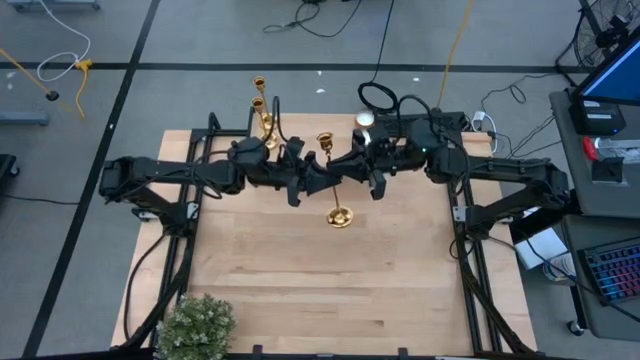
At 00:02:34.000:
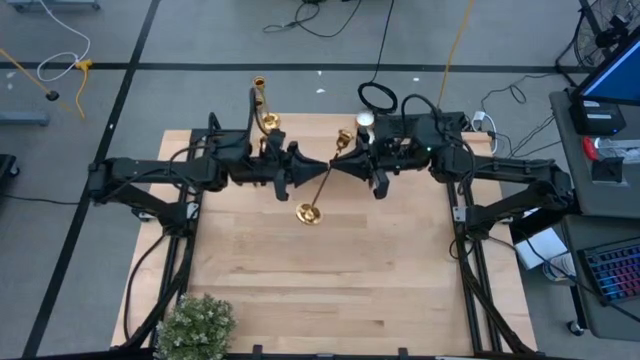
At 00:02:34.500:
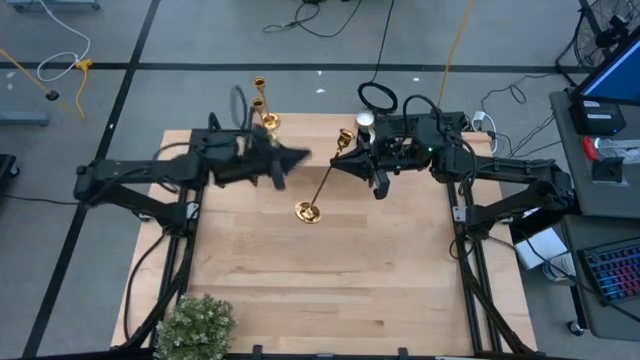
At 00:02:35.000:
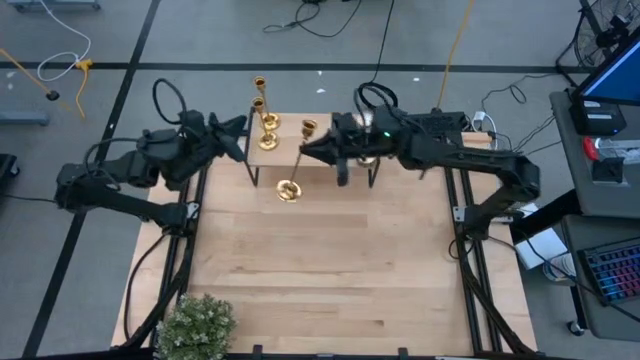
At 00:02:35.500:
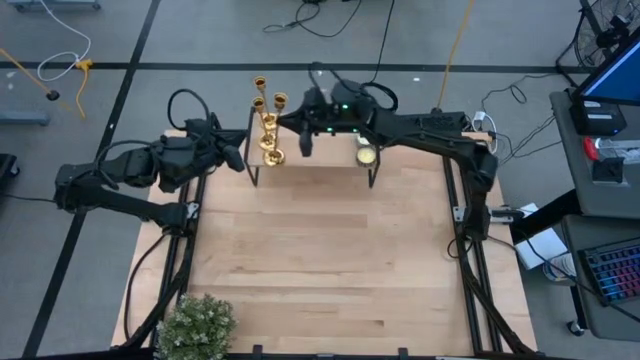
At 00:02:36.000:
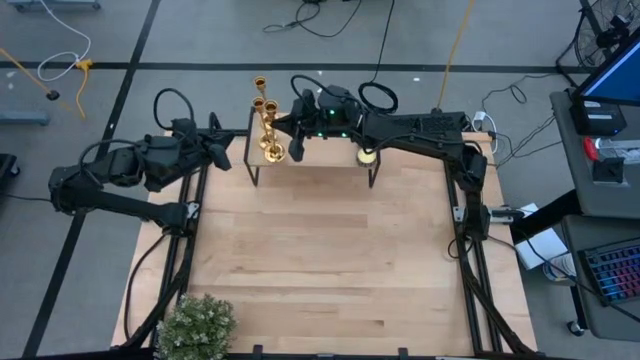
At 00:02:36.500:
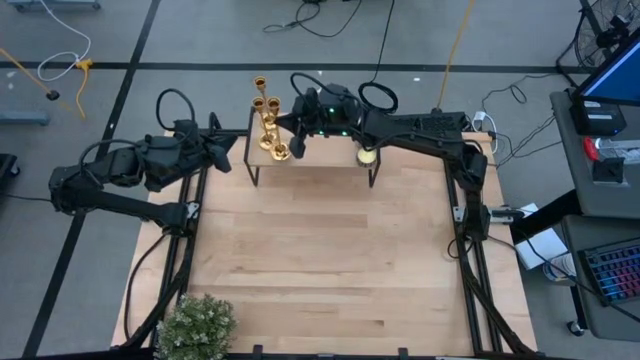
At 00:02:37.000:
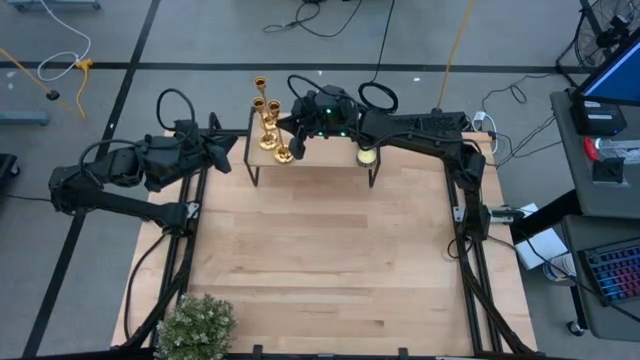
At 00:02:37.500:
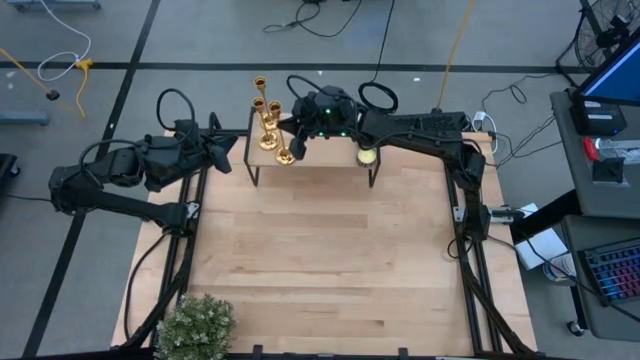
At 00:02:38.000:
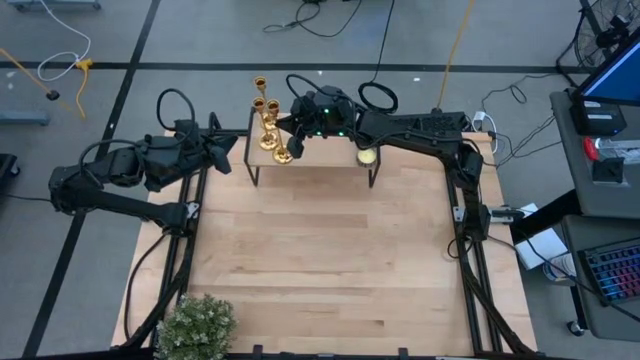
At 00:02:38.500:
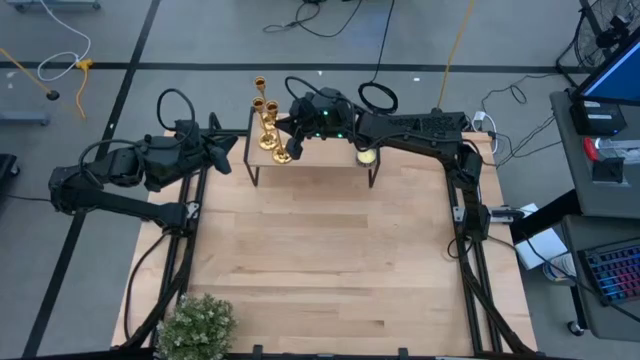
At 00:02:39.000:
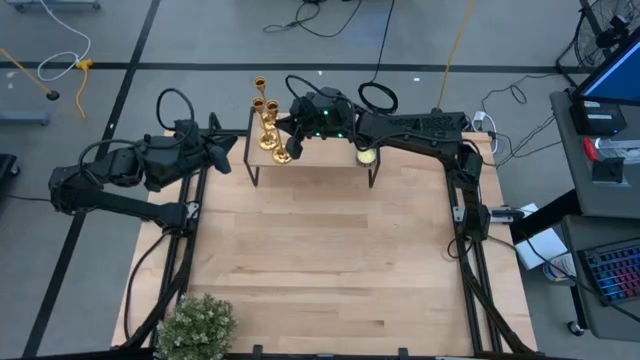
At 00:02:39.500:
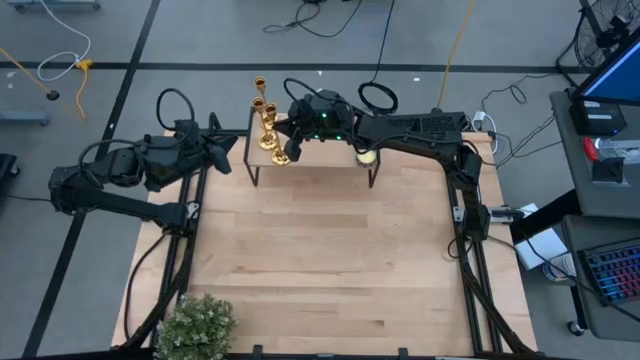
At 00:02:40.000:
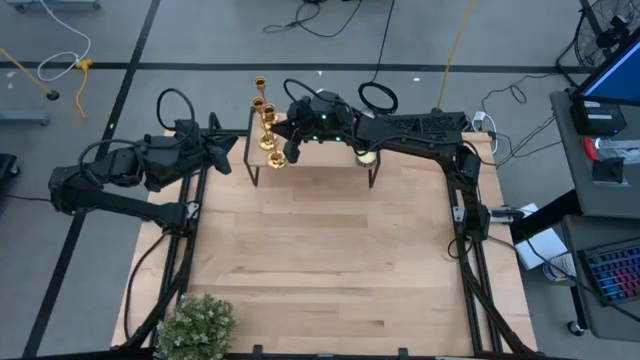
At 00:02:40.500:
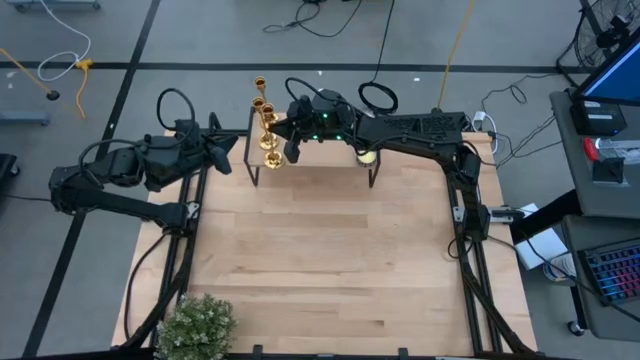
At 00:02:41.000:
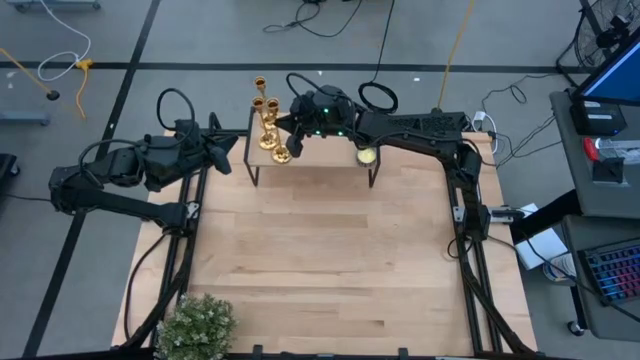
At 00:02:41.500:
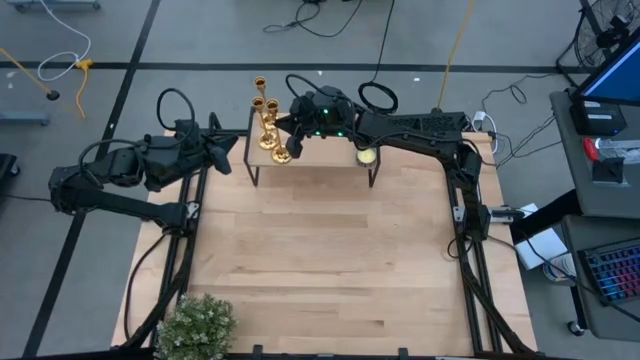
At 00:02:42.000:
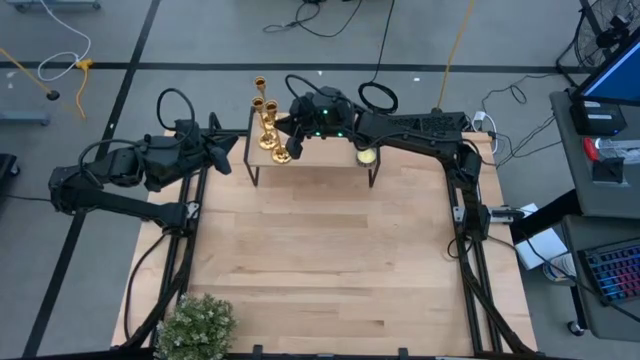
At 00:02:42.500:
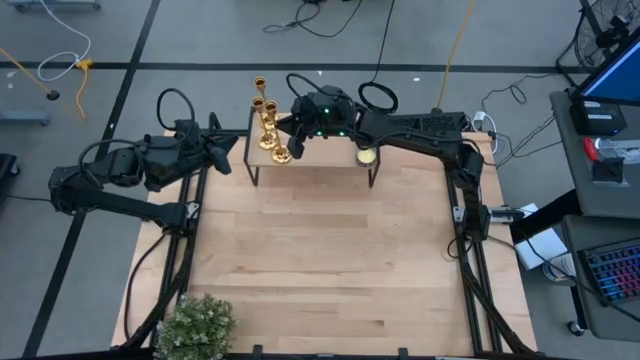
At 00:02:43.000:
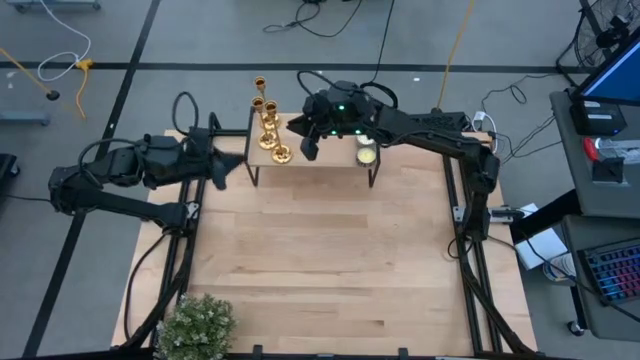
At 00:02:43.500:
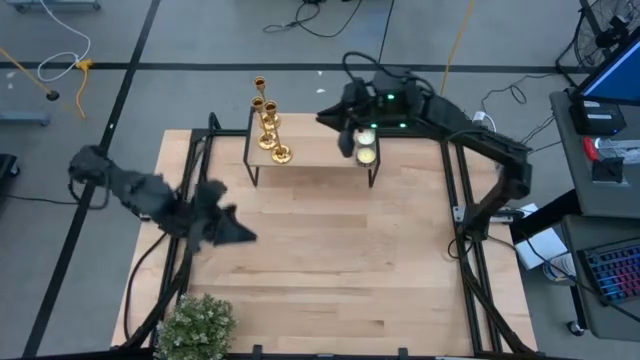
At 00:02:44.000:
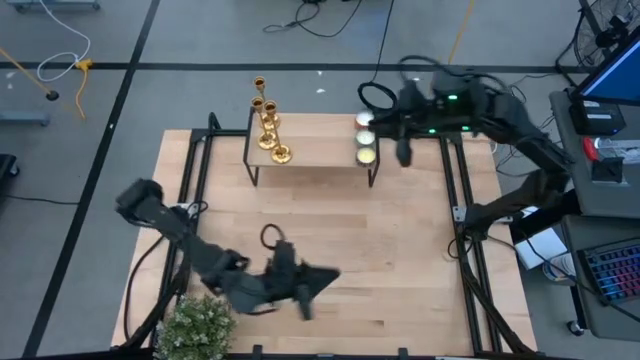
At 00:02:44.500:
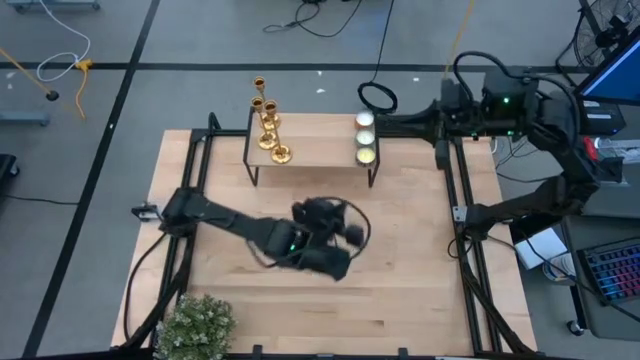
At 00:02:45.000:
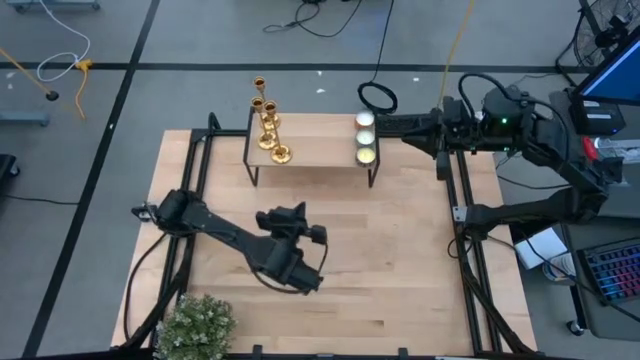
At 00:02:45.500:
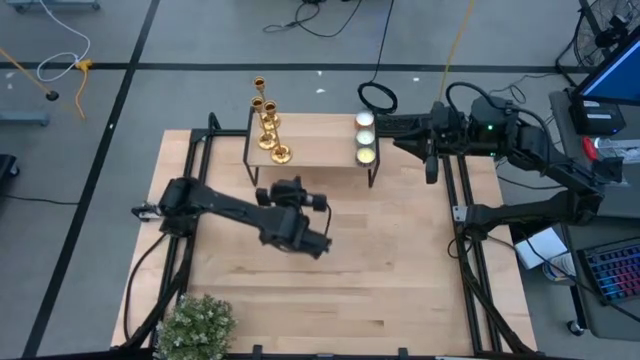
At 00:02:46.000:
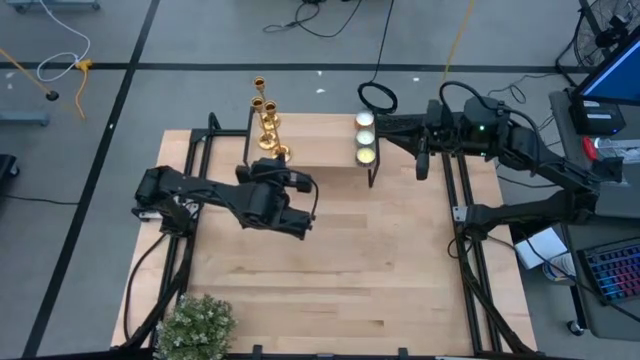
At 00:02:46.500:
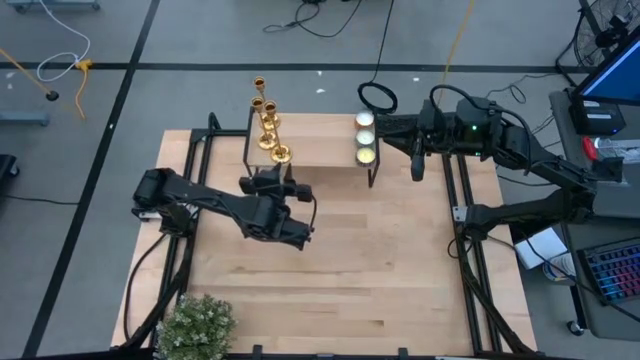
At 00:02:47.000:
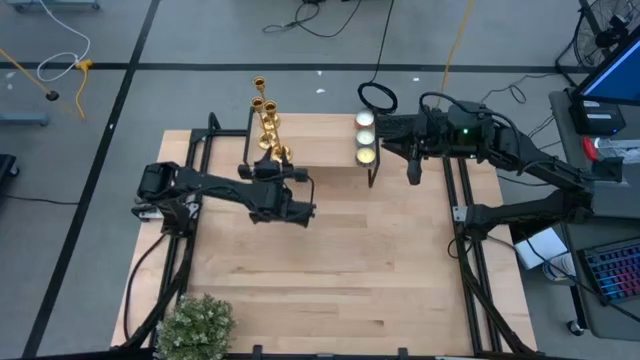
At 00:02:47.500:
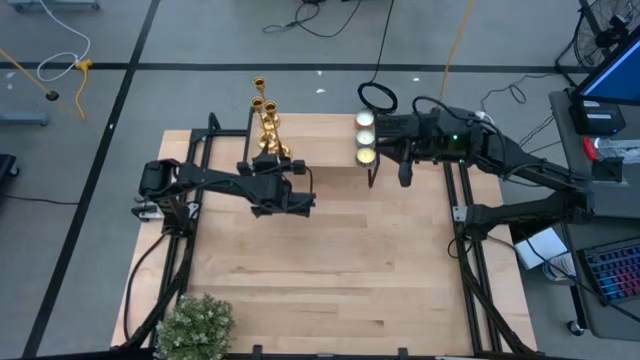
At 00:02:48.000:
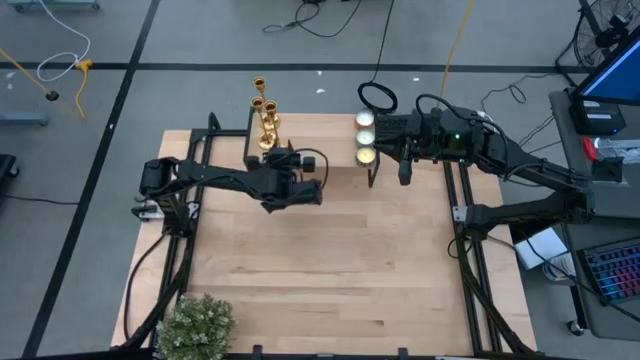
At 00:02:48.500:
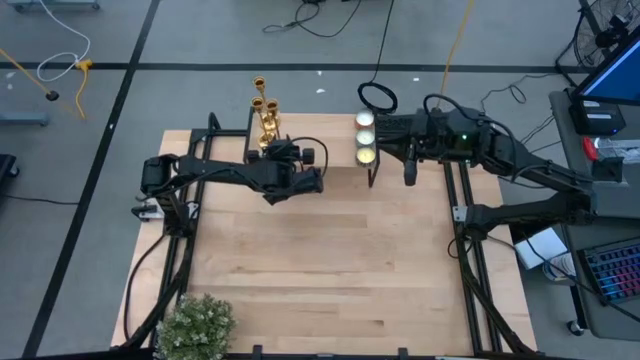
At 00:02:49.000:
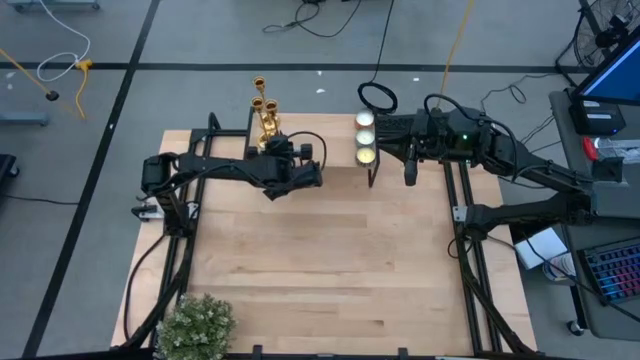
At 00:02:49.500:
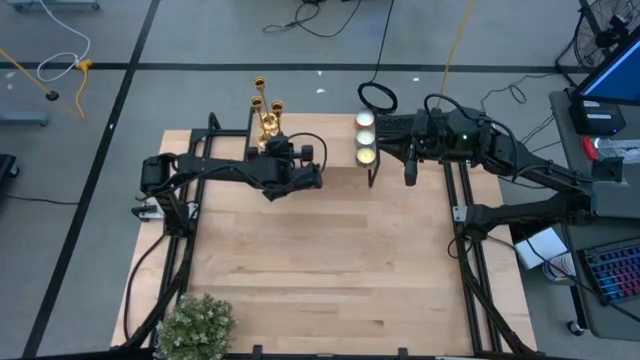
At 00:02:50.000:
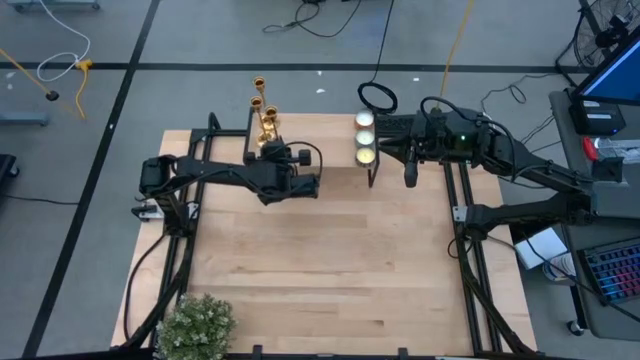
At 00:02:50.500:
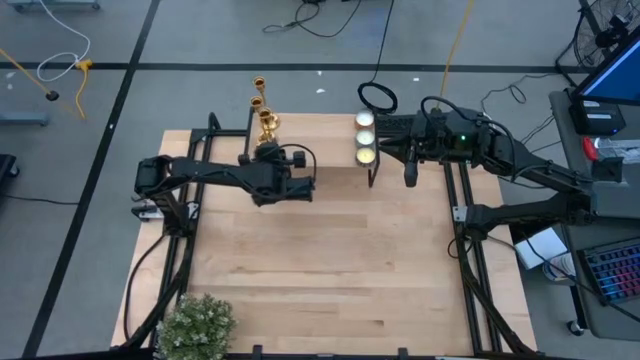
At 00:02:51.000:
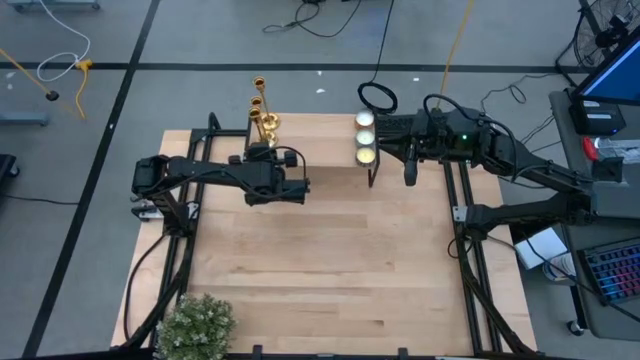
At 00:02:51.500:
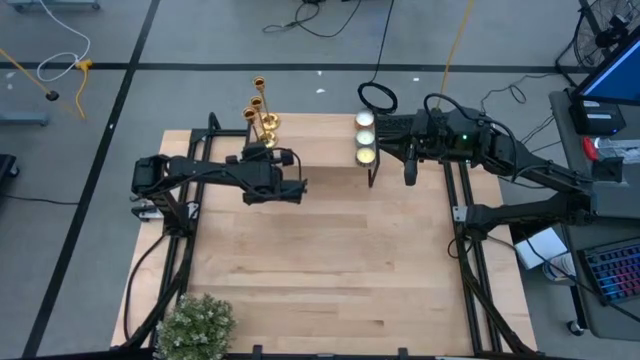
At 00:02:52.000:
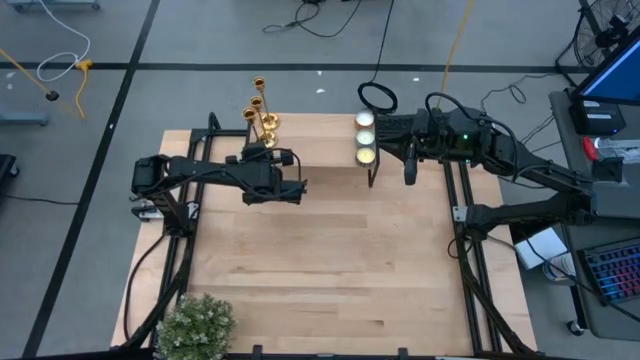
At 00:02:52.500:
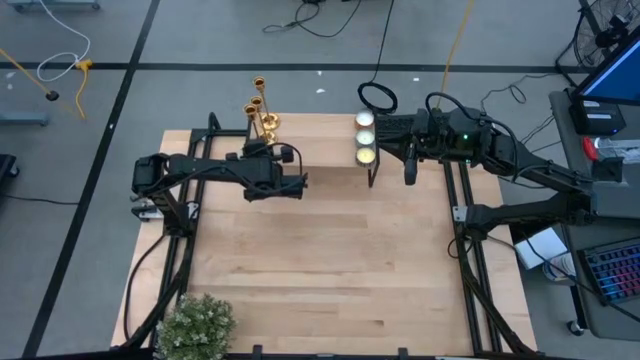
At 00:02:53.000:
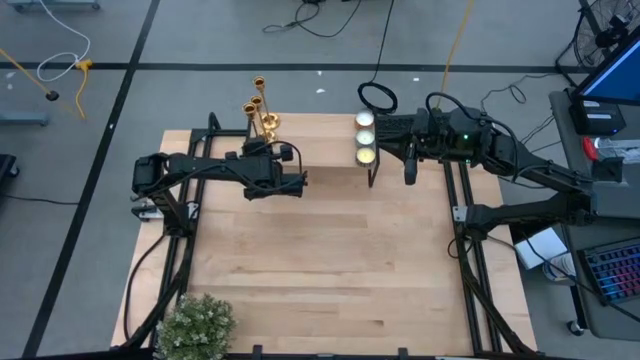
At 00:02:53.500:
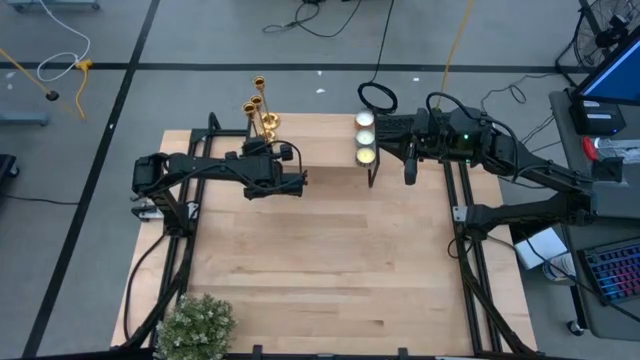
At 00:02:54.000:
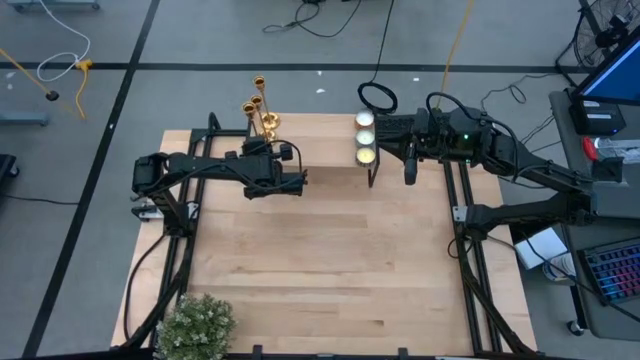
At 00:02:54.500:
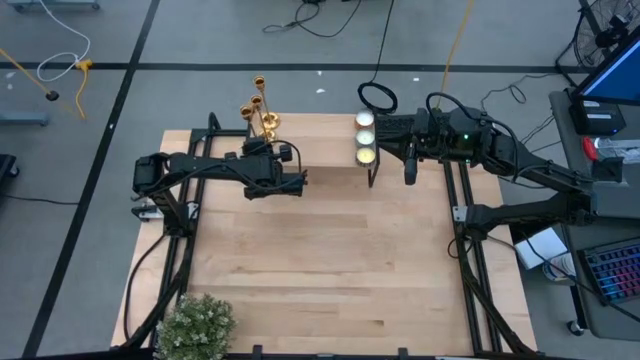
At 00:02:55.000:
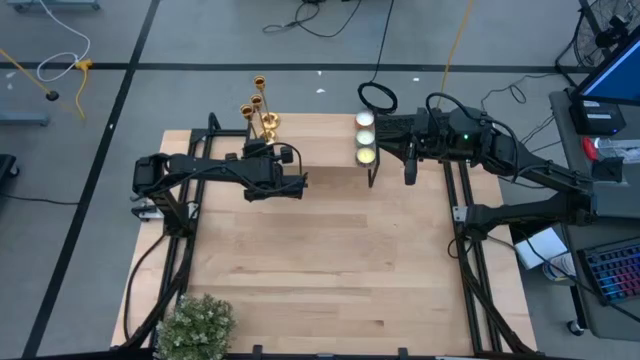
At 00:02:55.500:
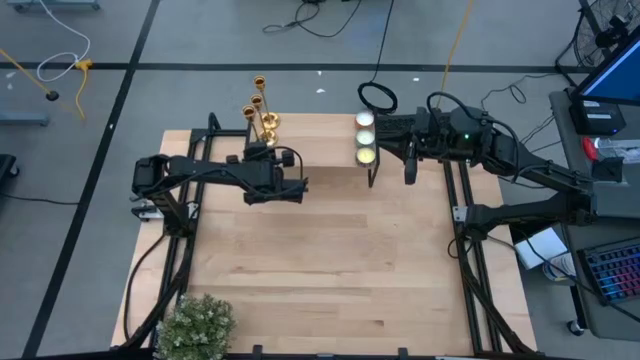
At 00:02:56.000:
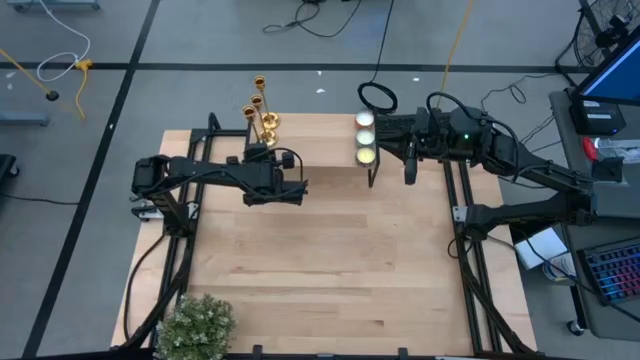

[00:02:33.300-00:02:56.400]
Task: Pick & Place candle stick holders
Put the gold candle holder on the shelf aligned with the other gold candle holders
